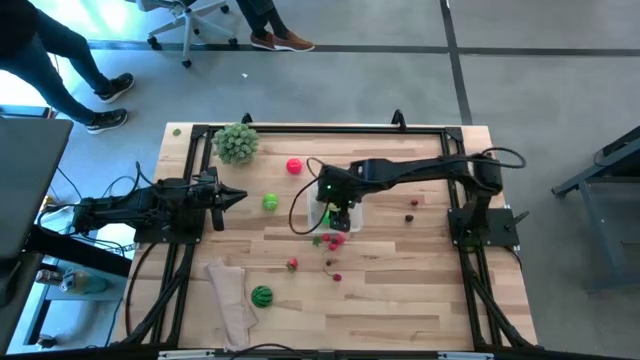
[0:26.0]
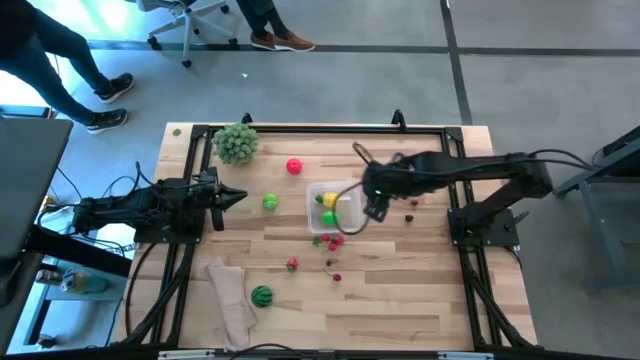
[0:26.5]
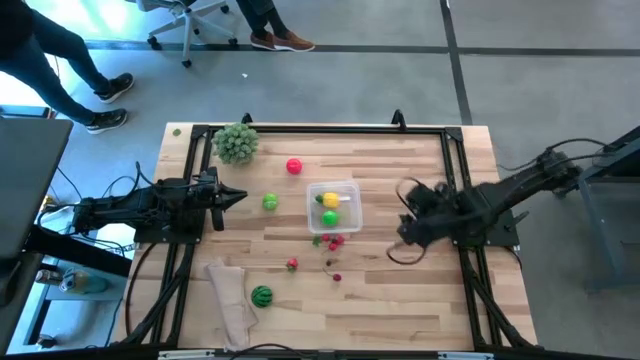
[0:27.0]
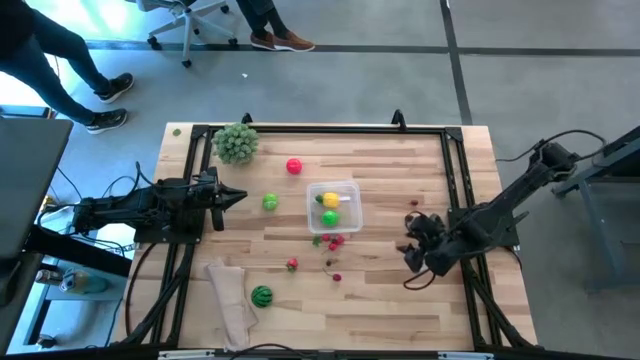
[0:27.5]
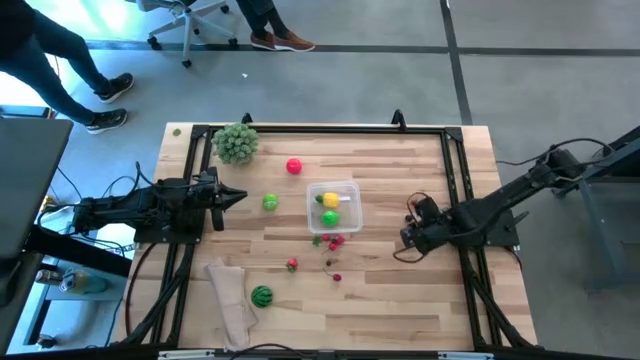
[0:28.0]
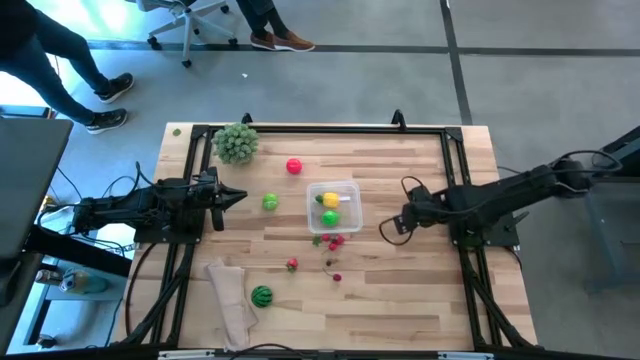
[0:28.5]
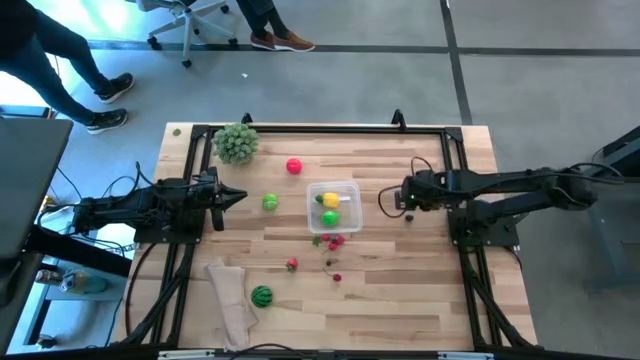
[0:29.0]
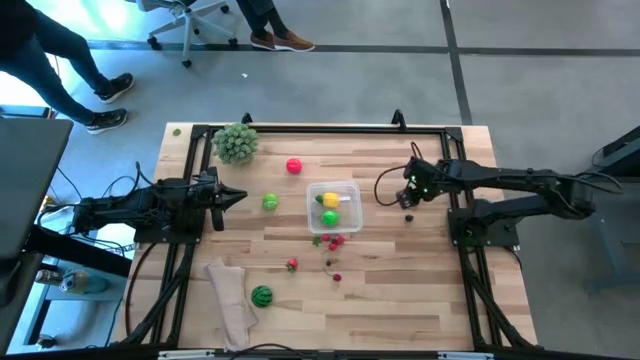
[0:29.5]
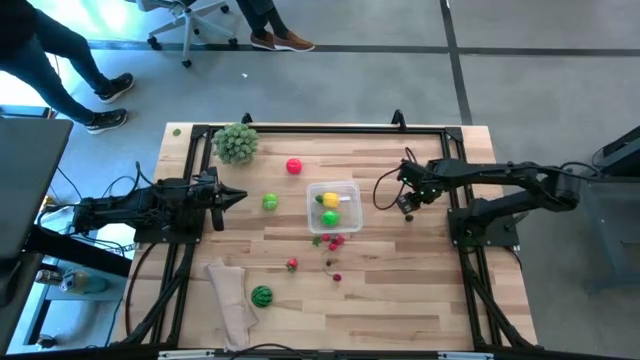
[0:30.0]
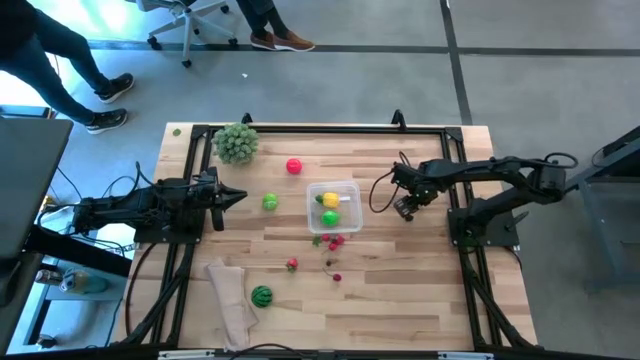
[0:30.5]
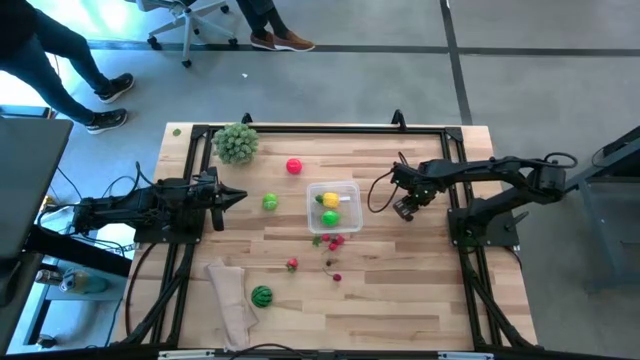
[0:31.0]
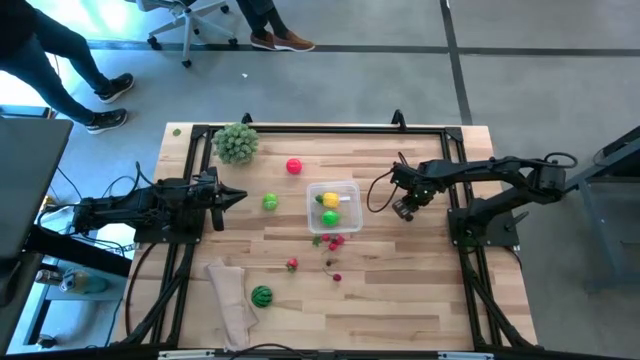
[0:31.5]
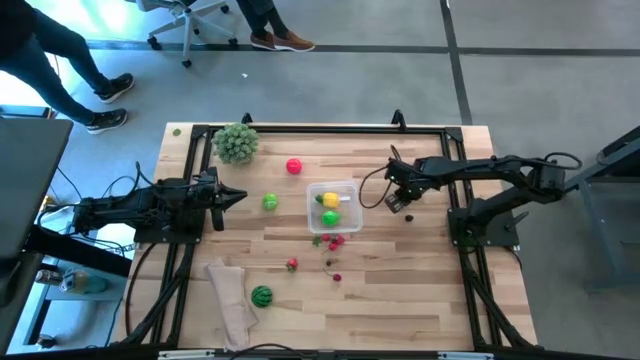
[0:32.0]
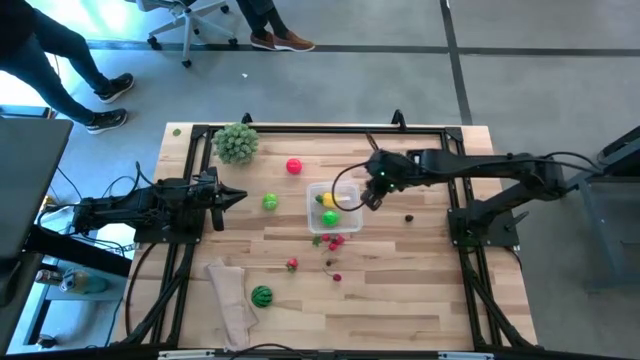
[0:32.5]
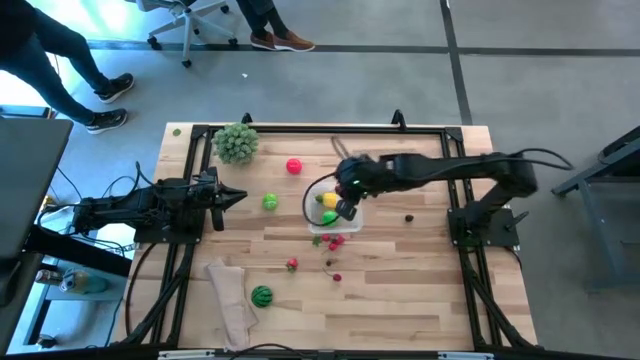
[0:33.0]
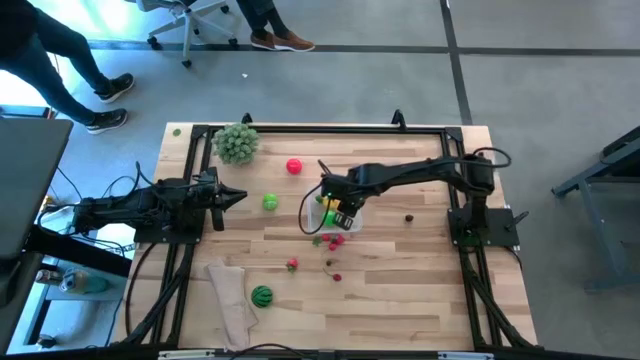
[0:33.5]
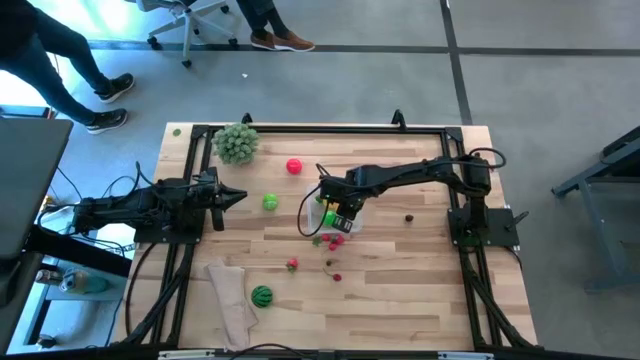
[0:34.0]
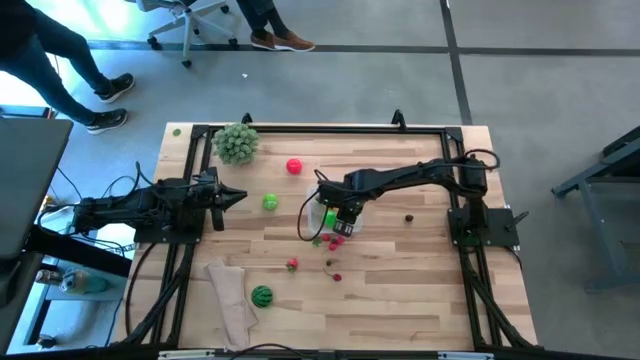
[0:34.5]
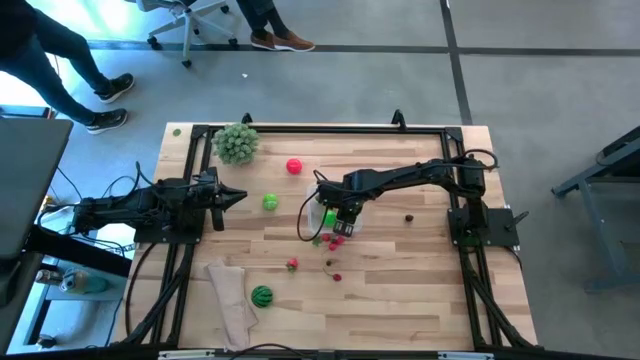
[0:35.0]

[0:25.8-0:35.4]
Task: Pick and placing Produce into tupperware
Put the red cherry into the transparent container

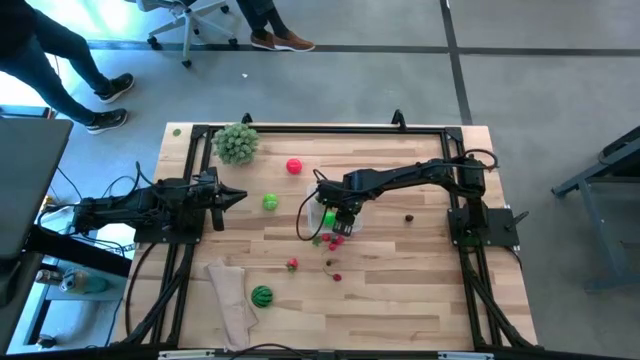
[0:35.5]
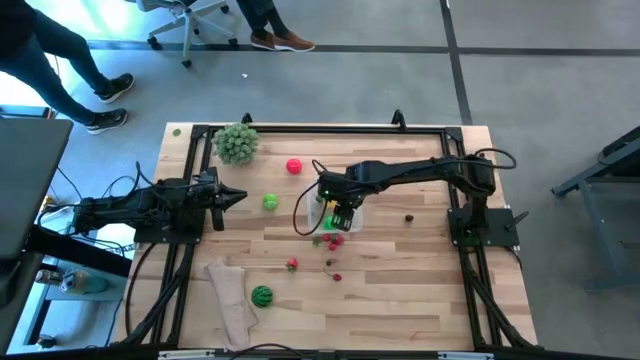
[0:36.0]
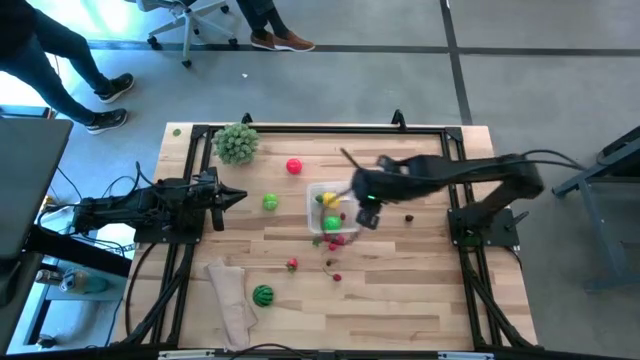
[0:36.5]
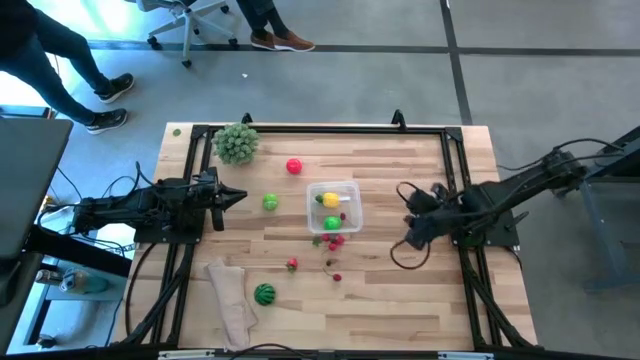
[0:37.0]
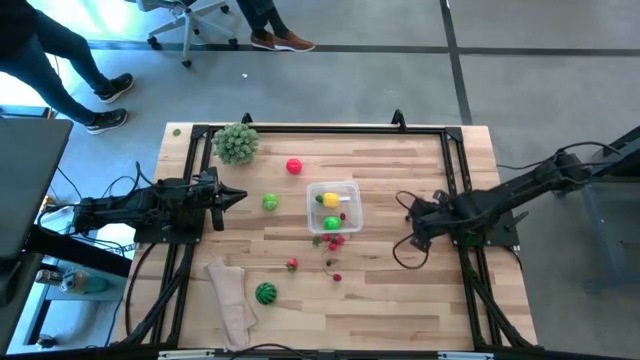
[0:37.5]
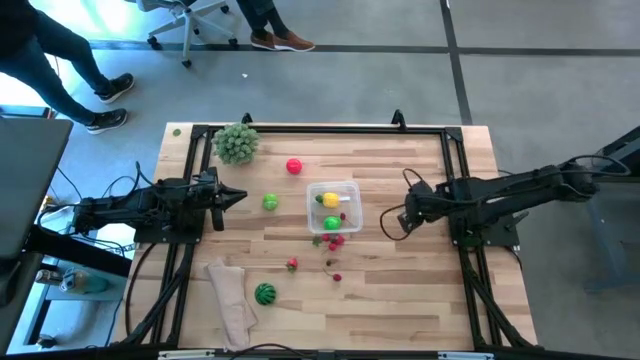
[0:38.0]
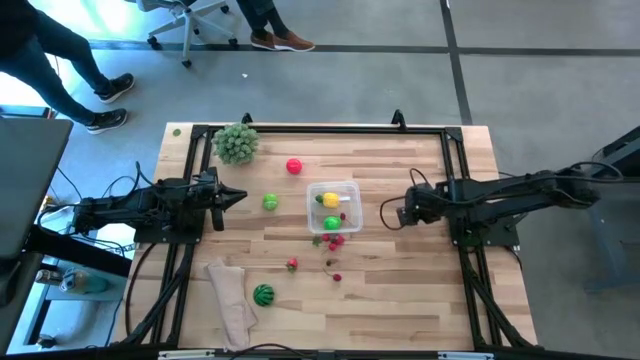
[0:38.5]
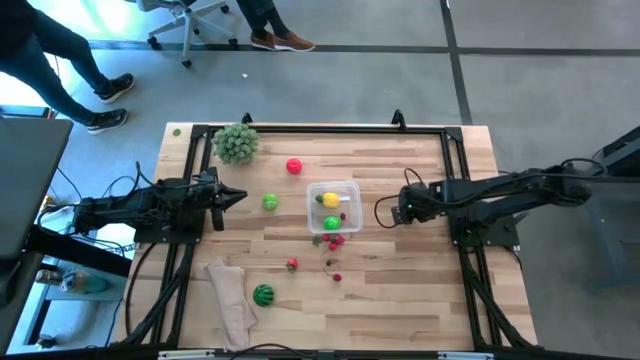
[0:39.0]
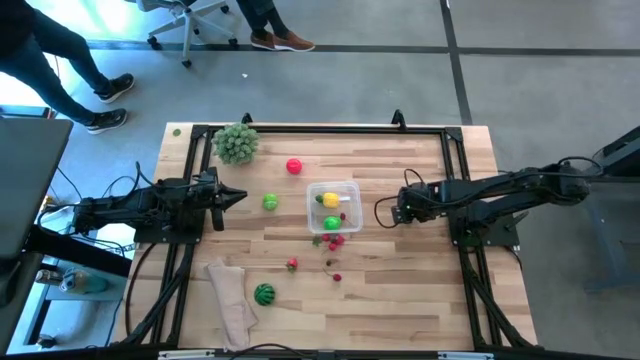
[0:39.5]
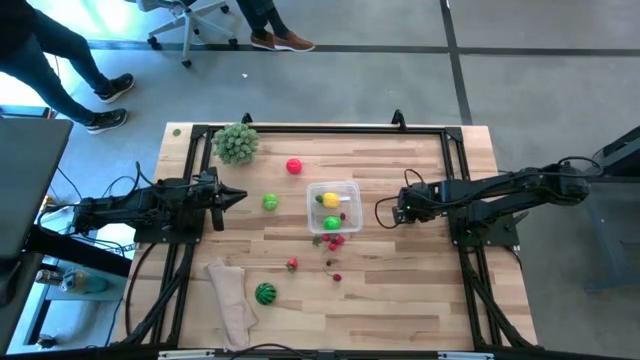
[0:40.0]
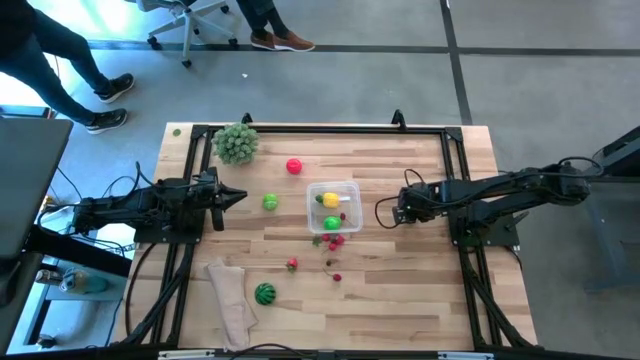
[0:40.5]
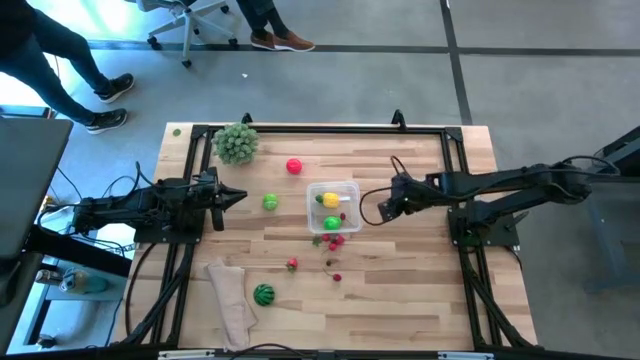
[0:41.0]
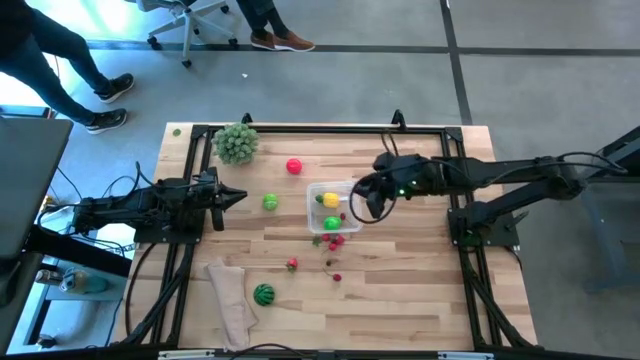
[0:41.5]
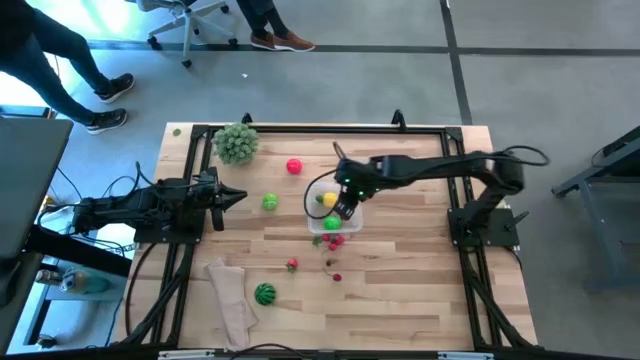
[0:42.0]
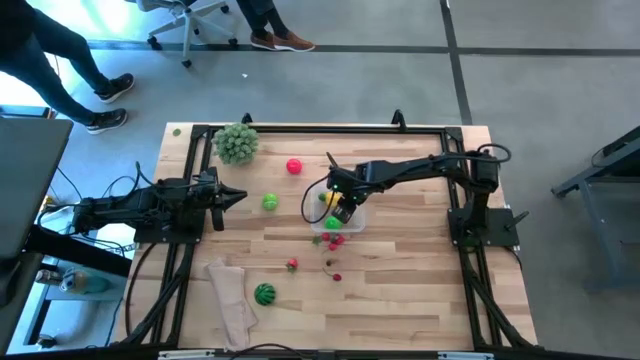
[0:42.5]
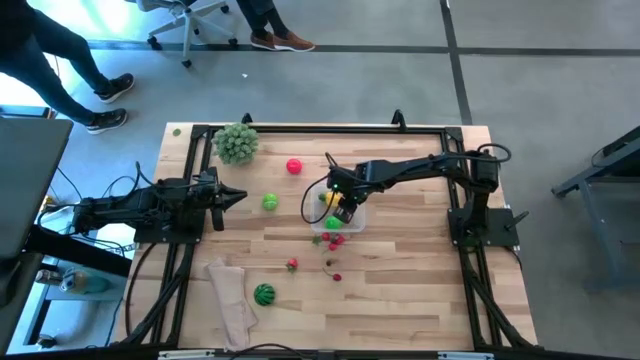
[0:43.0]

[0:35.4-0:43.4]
Put the blackberry into the transparent container

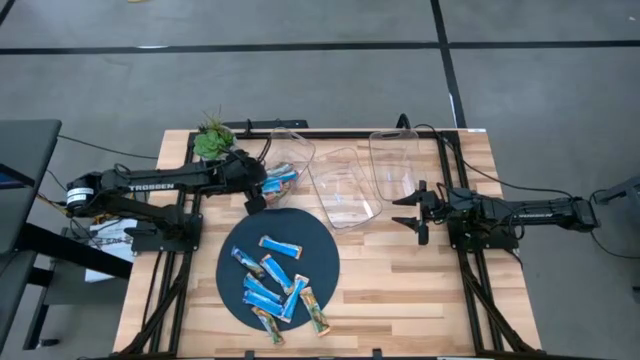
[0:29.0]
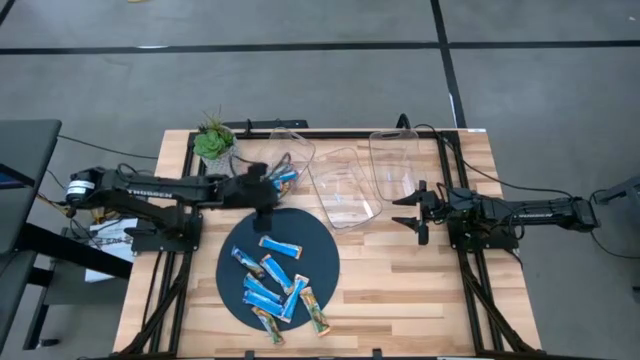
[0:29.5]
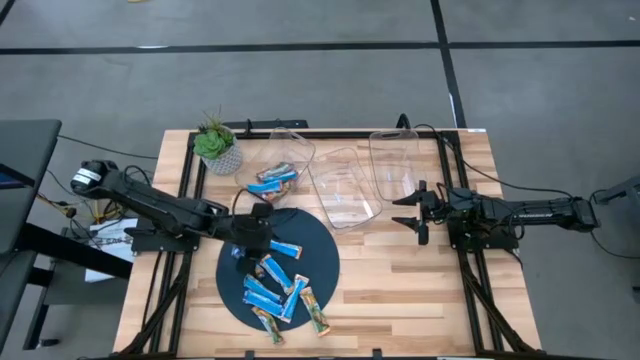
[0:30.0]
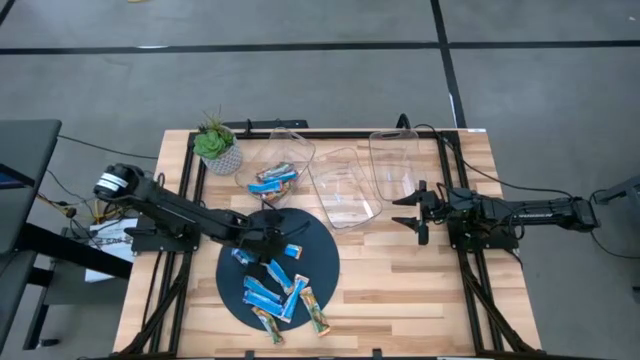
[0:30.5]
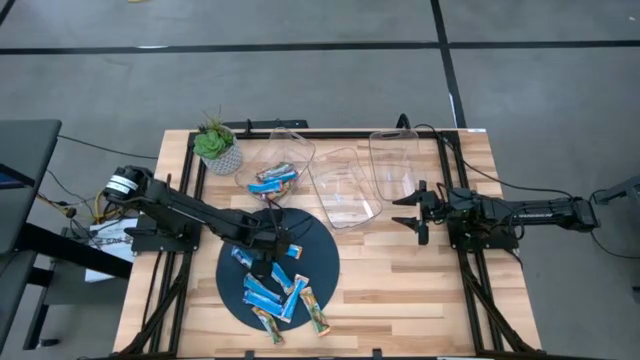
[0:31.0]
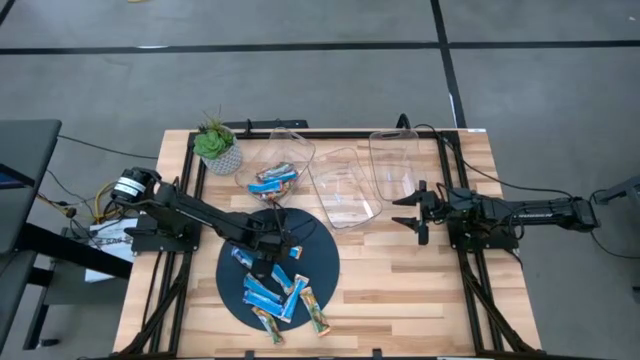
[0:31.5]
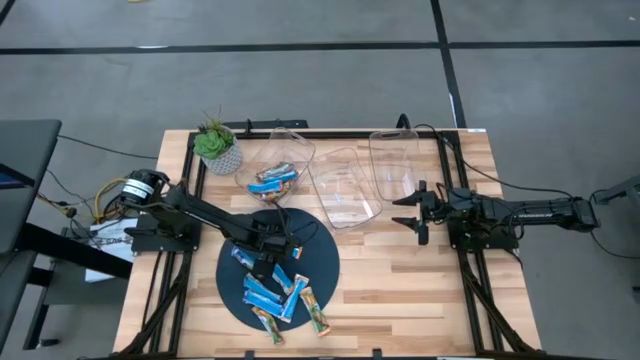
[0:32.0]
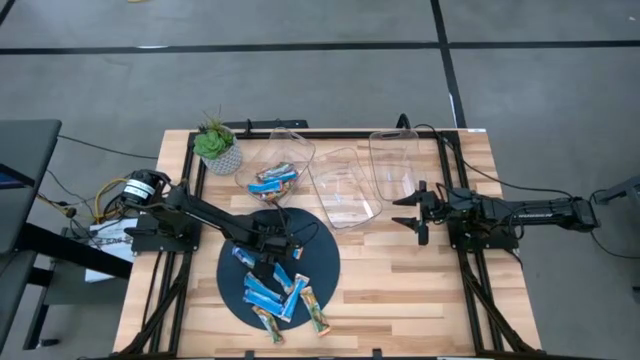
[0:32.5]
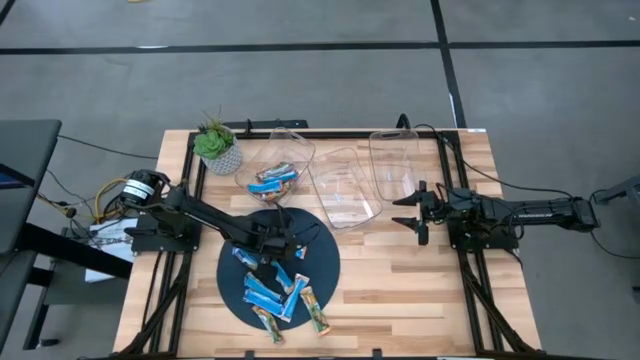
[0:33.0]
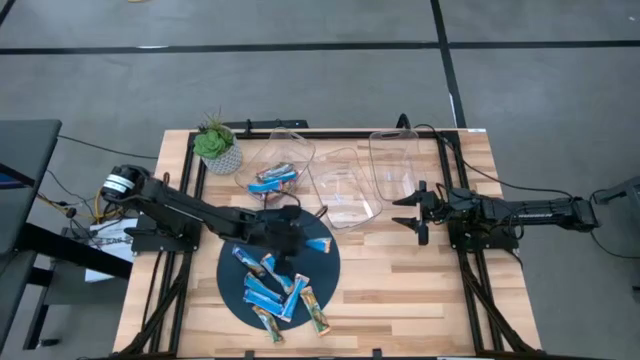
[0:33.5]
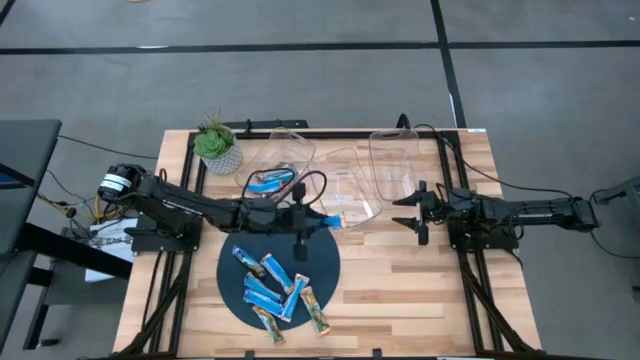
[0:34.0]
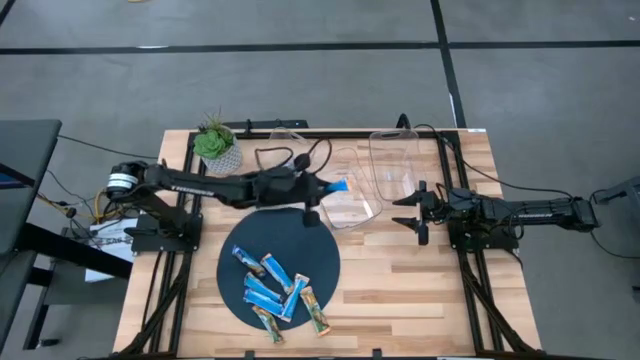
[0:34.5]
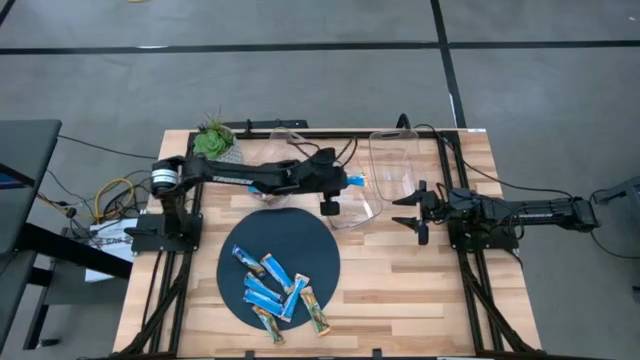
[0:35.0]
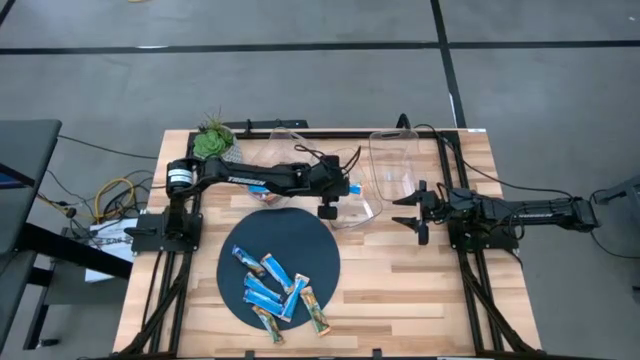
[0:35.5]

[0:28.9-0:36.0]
Task: Pick and place Granola Bars by type
Put the yellow granola bar into the middle transparent bin
